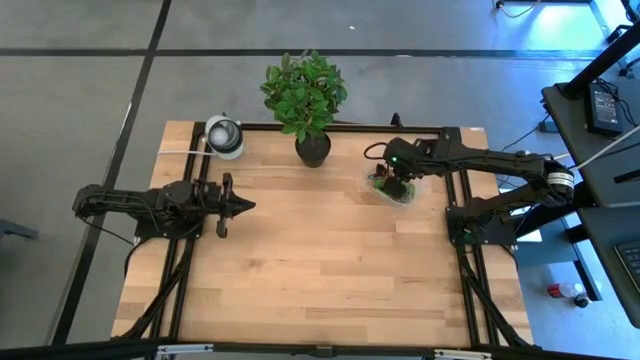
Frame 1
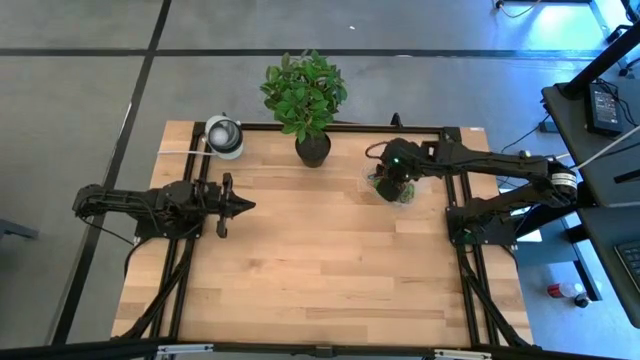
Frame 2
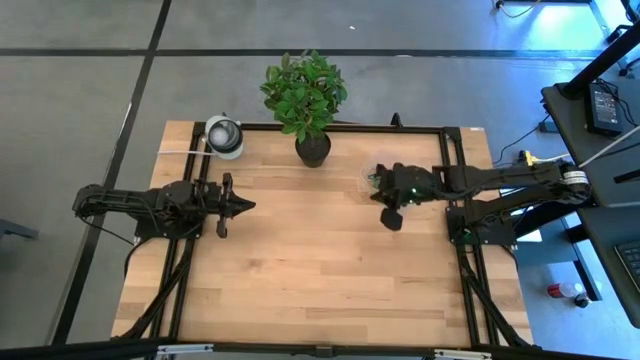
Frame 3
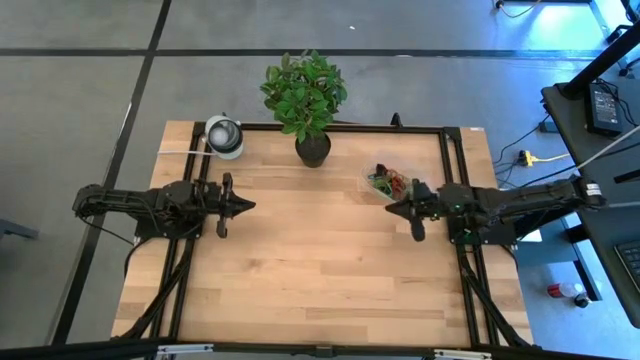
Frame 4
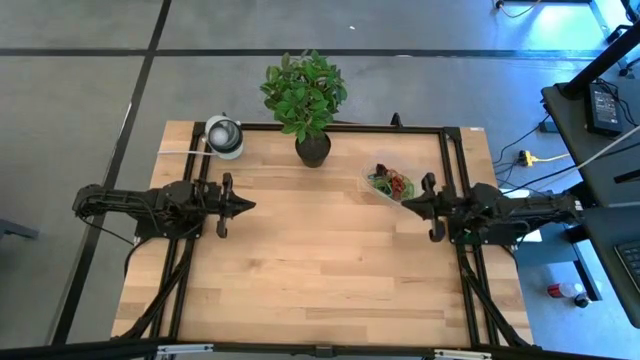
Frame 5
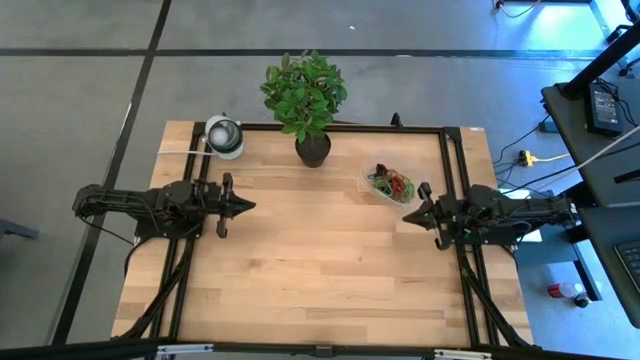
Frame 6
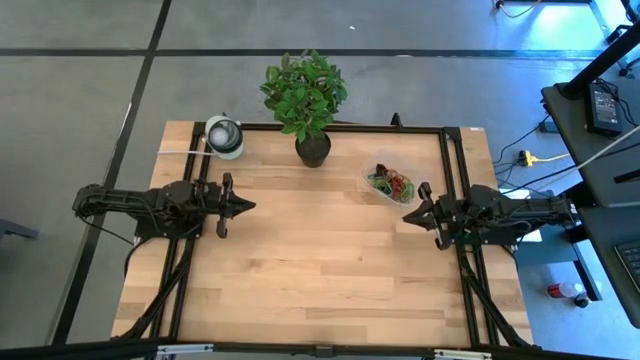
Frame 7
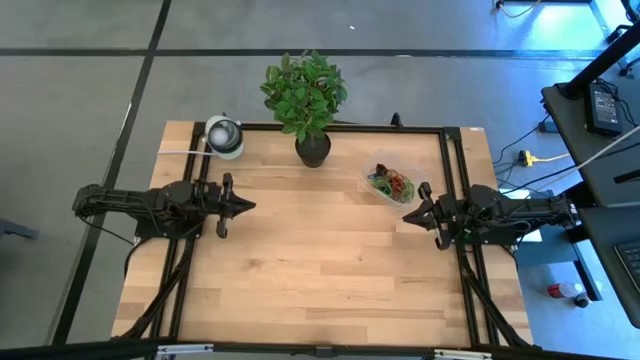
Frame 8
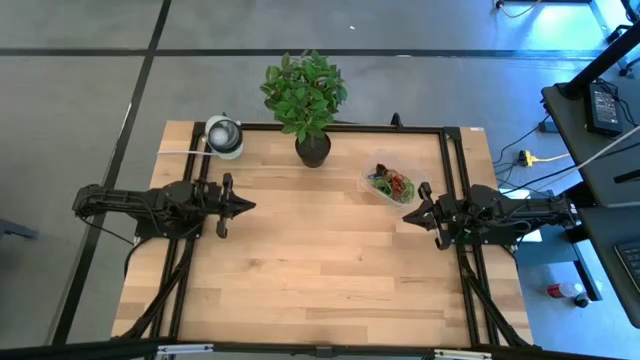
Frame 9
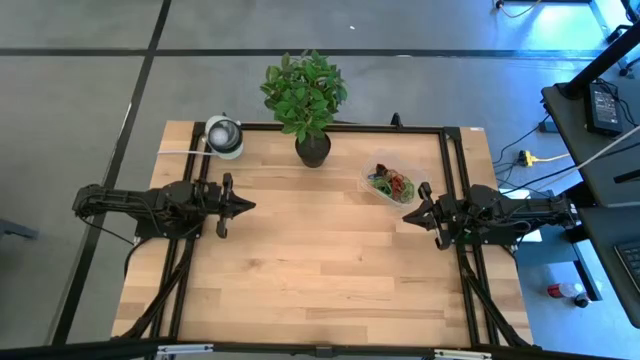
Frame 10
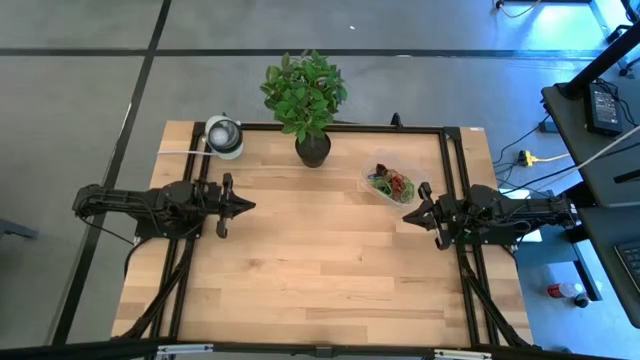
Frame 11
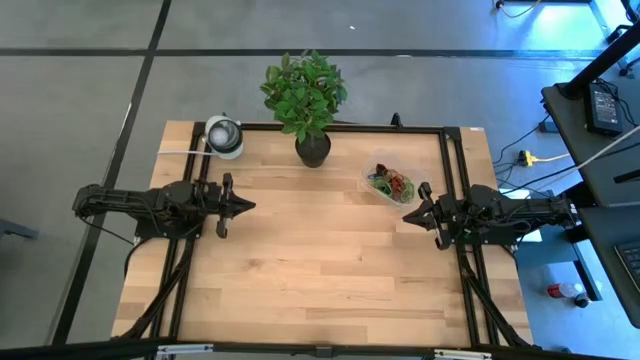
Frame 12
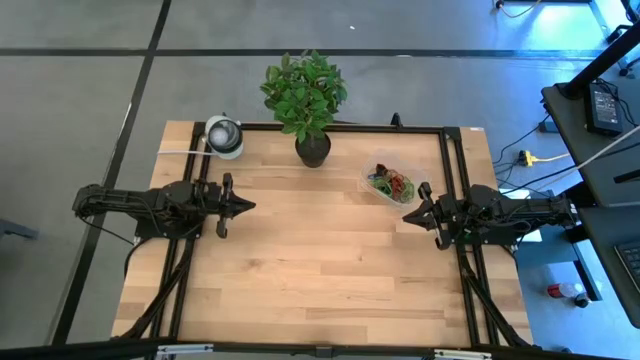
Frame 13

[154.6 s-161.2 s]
Task: Pick and place rubber bands into bin
Return to Home Position

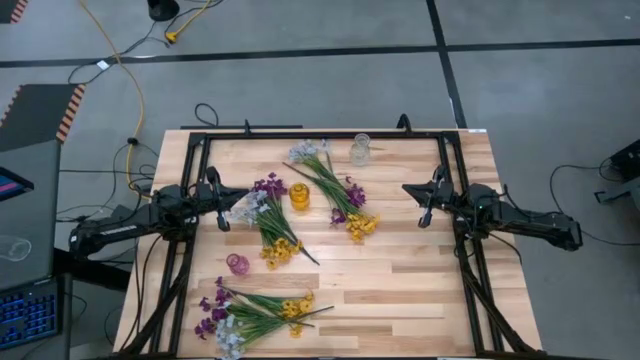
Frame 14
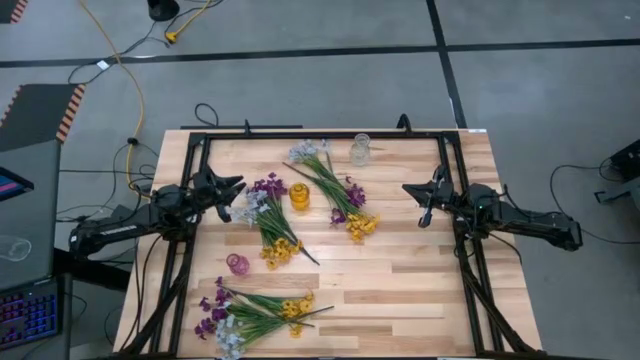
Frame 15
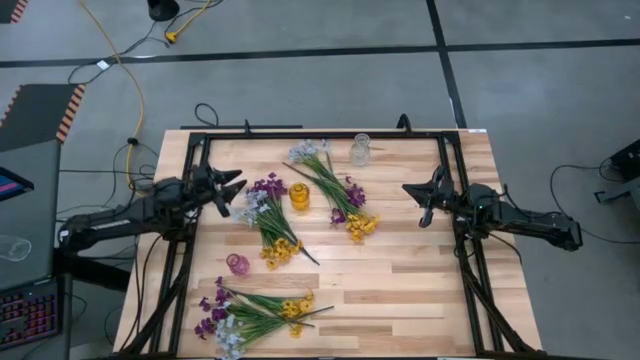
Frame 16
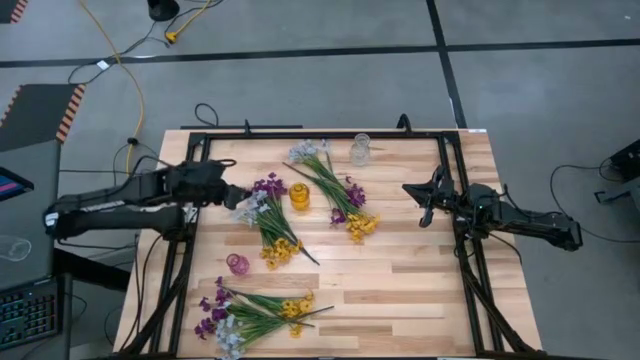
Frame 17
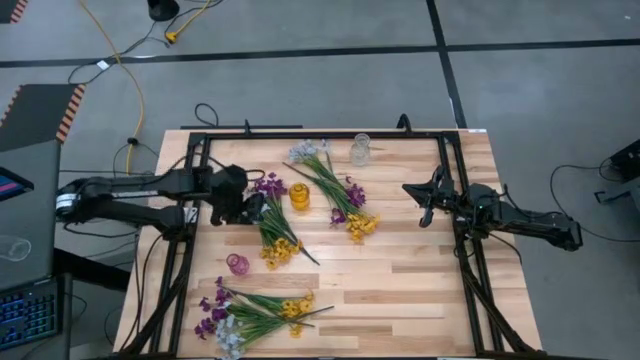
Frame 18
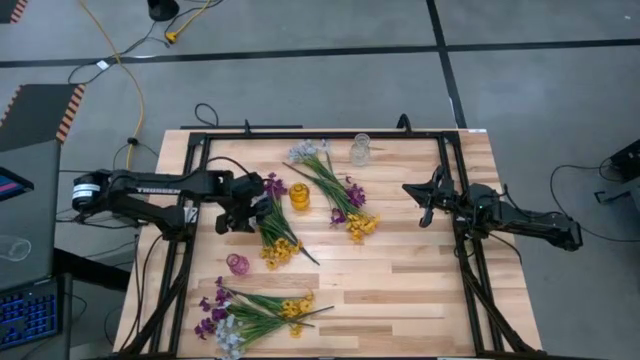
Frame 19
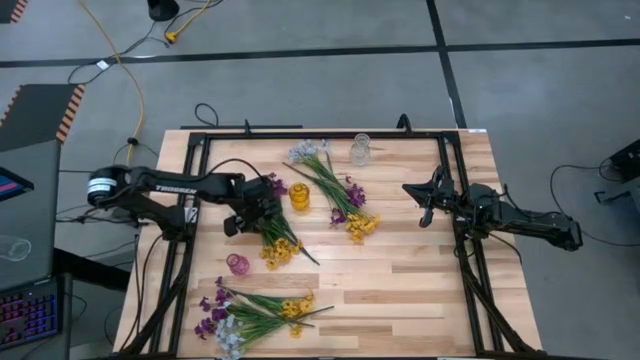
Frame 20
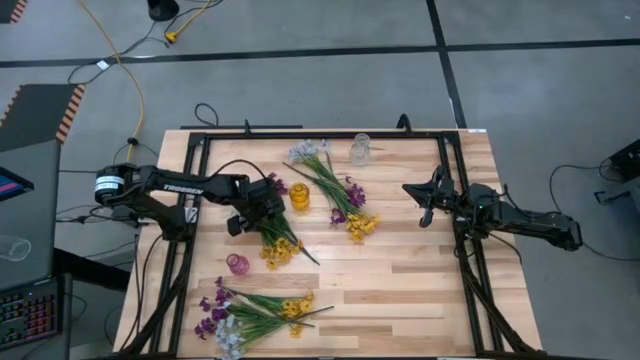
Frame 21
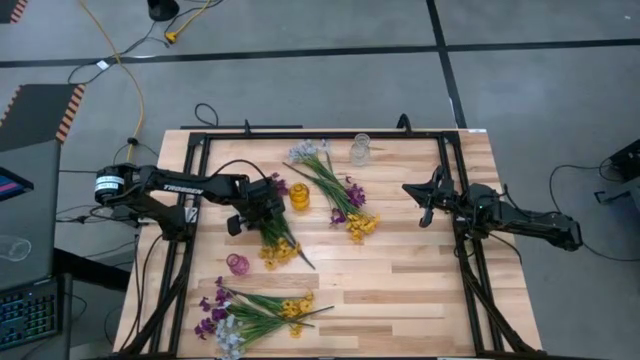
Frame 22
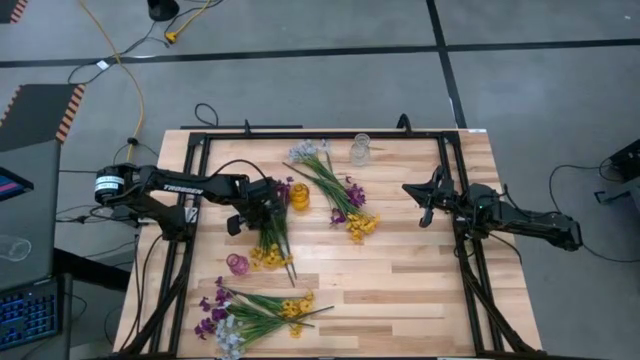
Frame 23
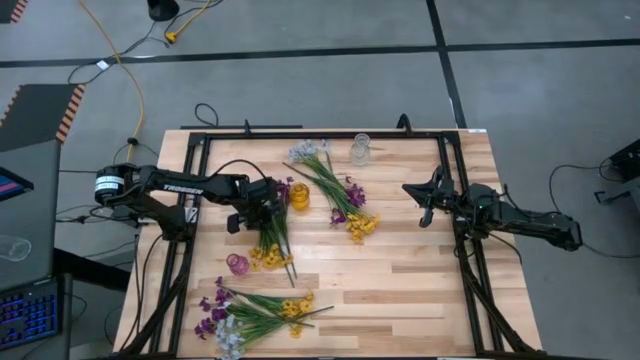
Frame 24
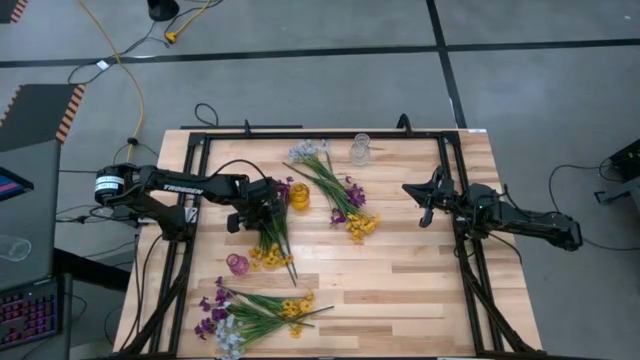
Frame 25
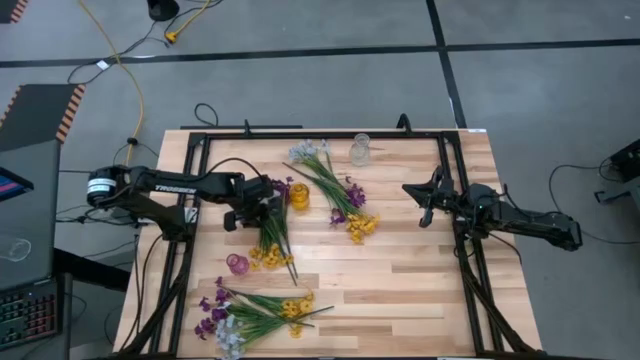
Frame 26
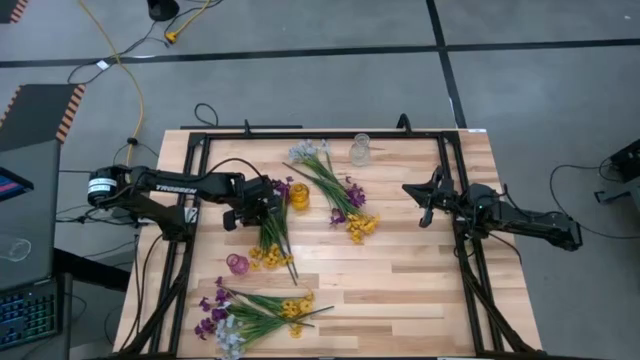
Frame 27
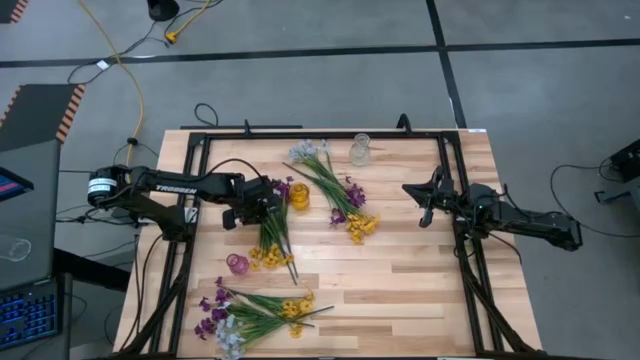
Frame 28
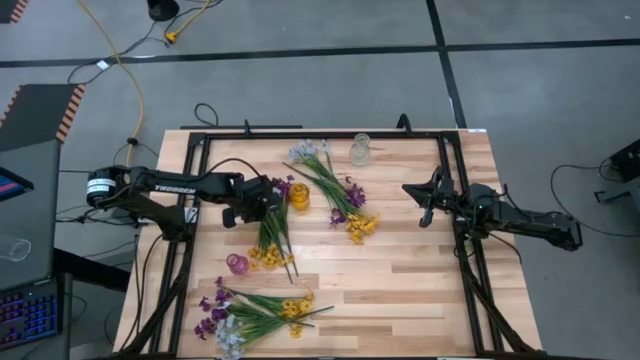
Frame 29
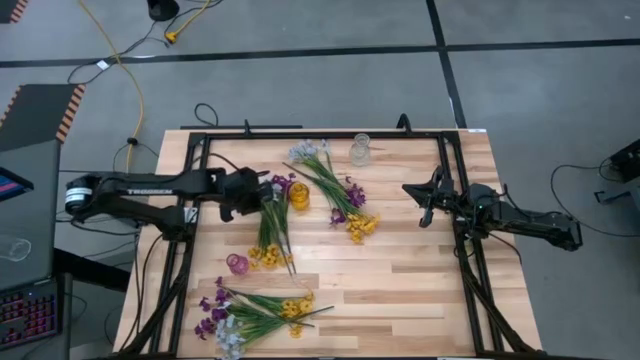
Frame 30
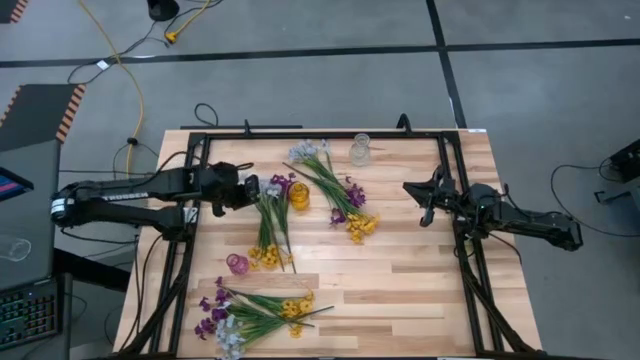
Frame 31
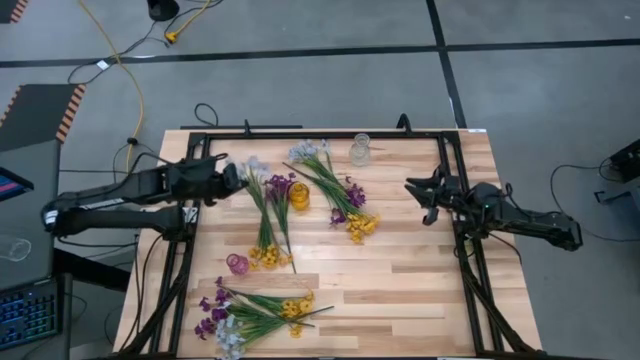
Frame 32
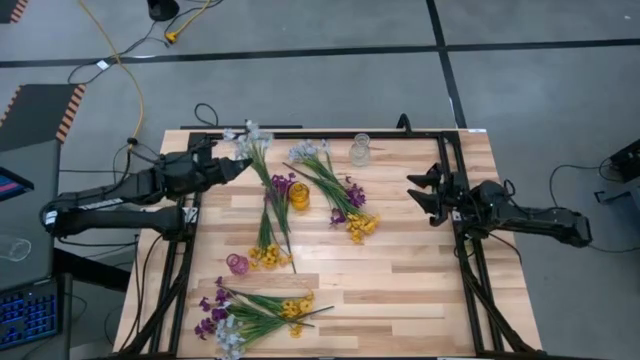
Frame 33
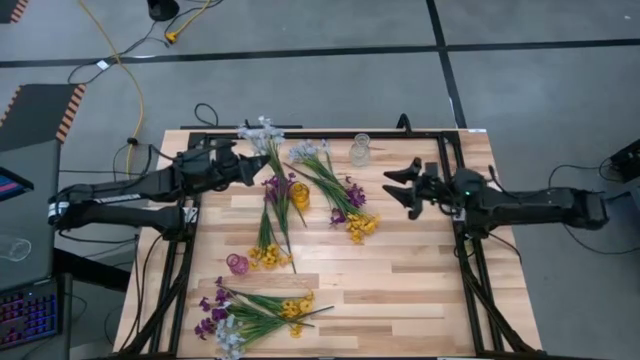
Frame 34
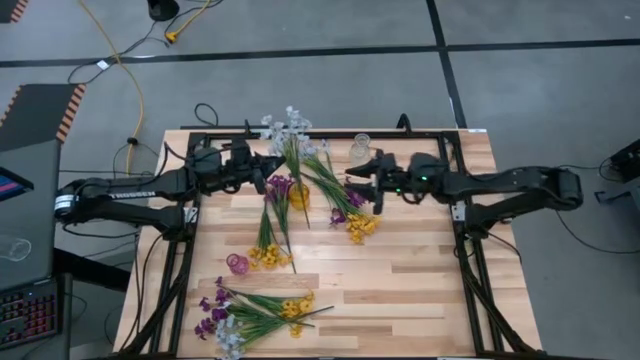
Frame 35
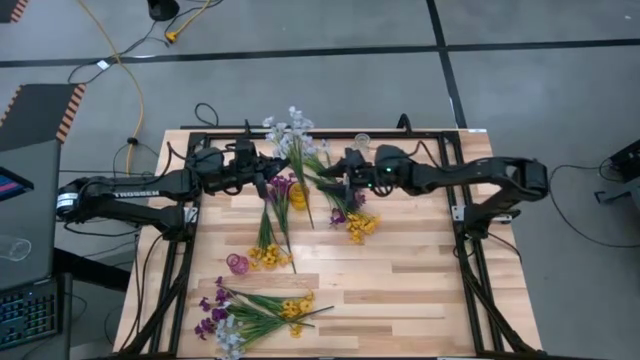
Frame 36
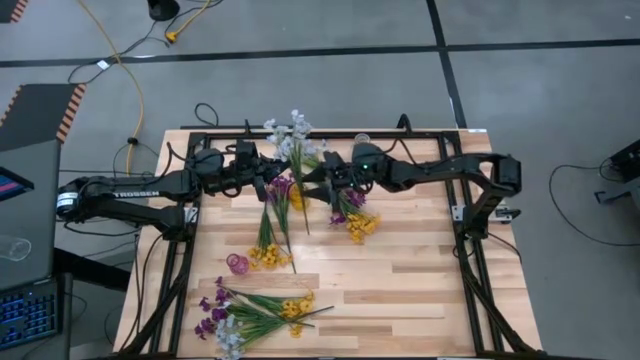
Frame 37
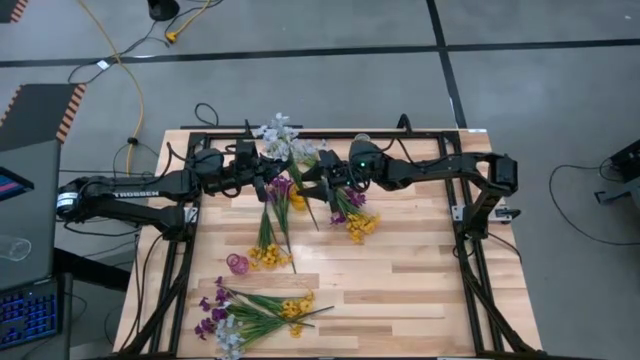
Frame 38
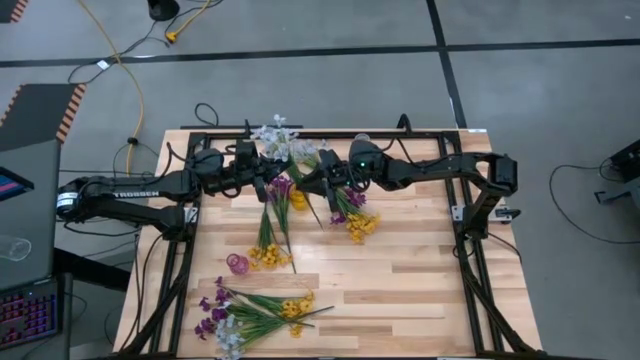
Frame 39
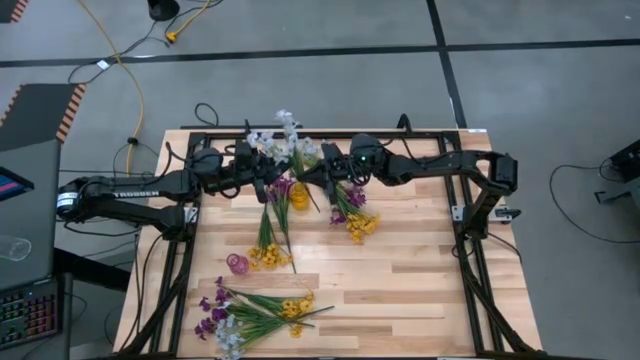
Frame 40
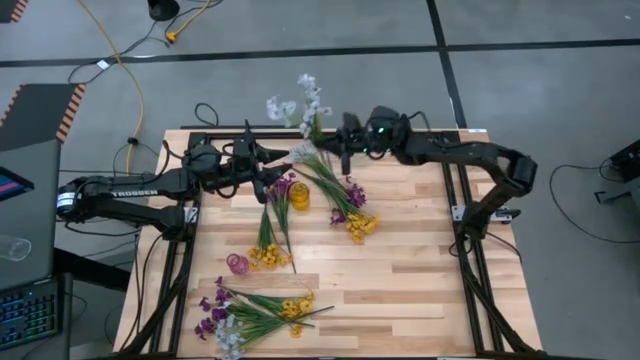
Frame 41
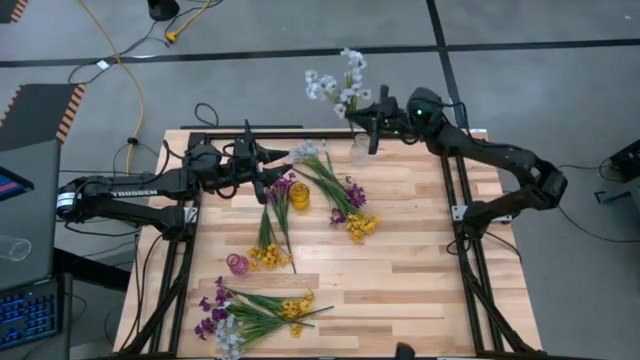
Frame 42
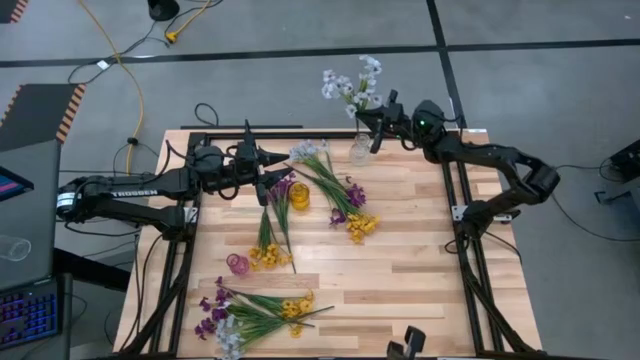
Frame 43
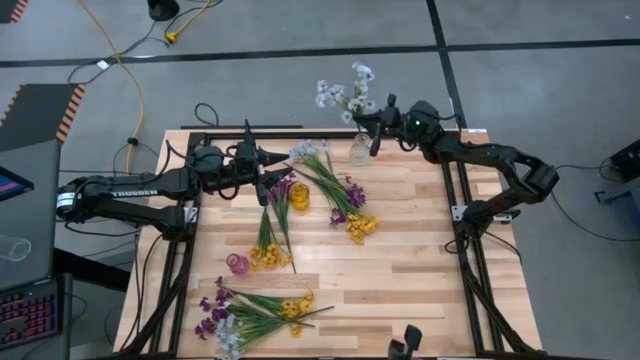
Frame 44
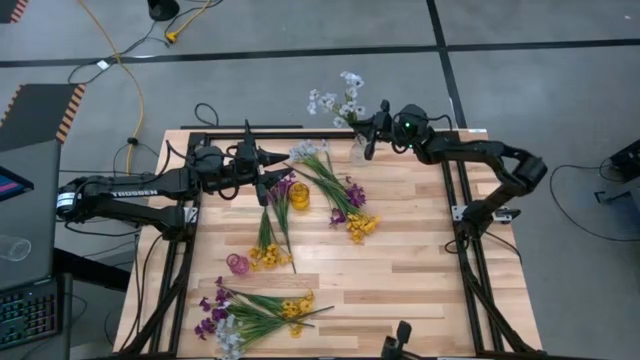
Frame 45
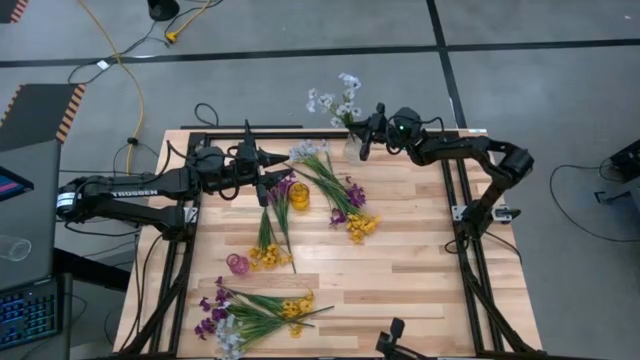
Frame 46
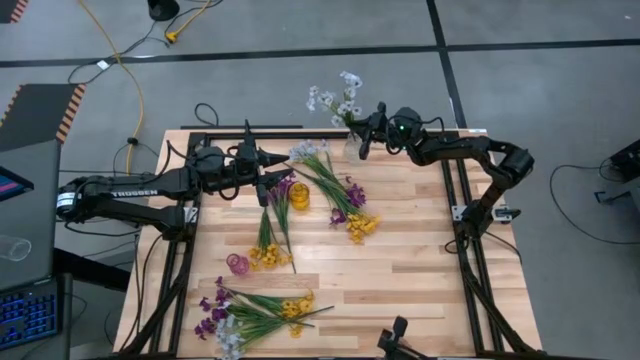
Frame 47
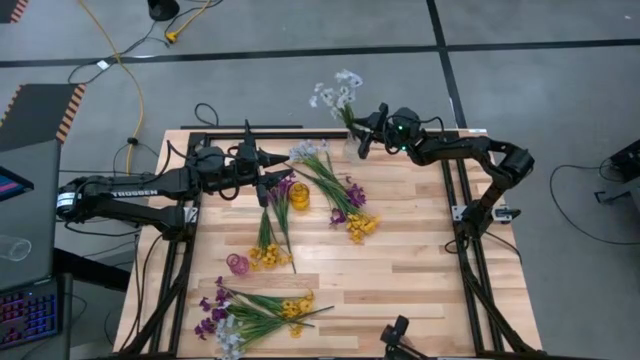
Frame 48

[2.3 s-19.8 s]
Task: Sort flowers into vase by color
Put the middle white flowers into the transparent vase
